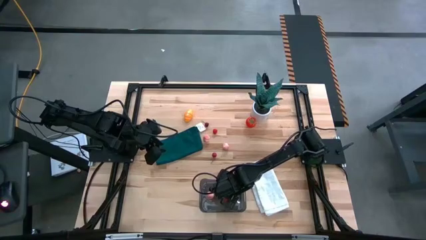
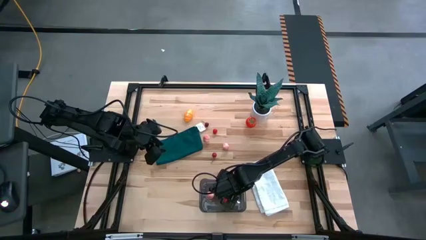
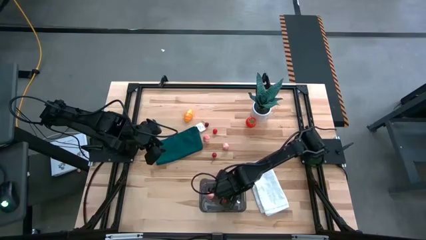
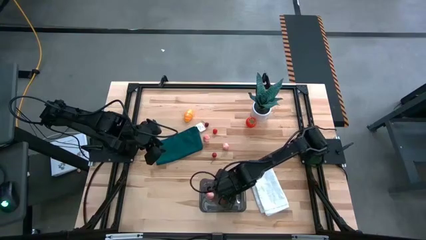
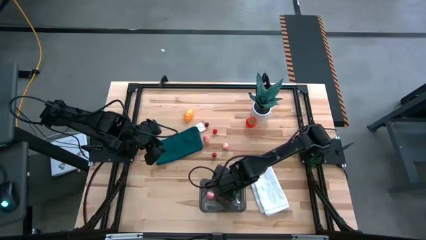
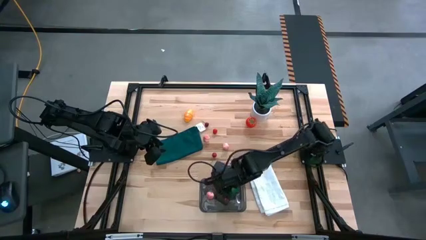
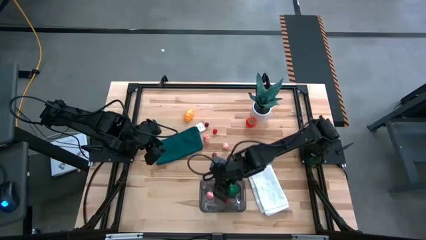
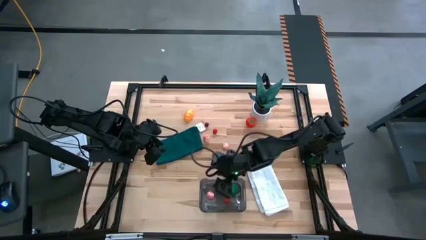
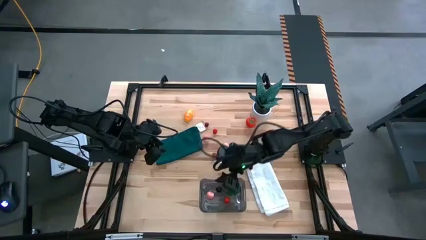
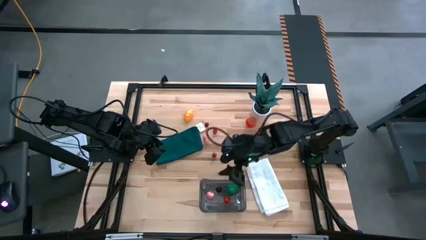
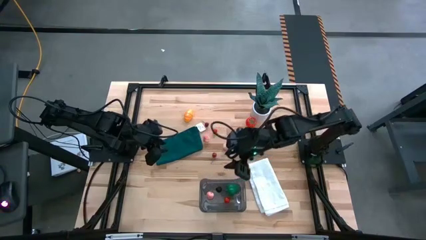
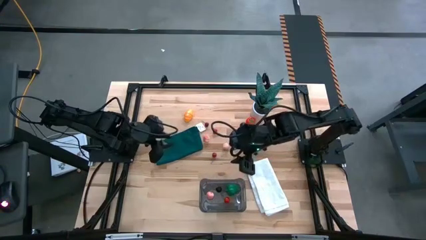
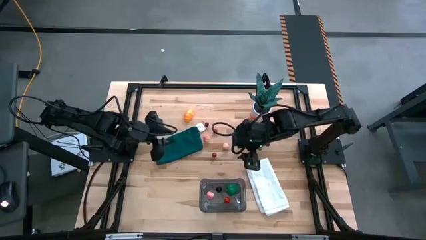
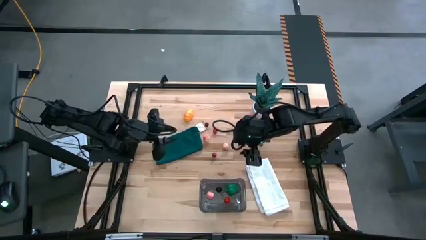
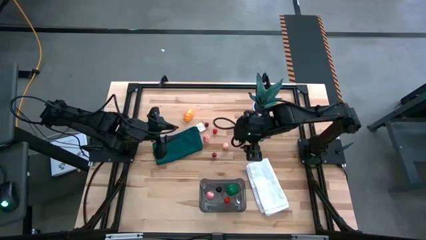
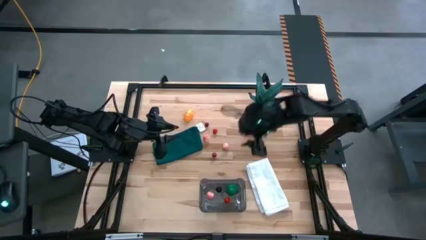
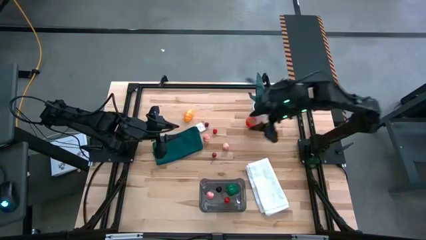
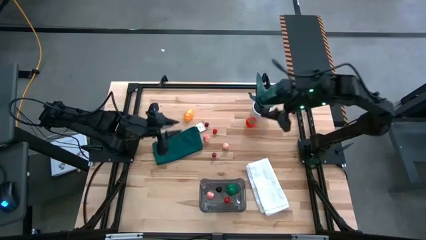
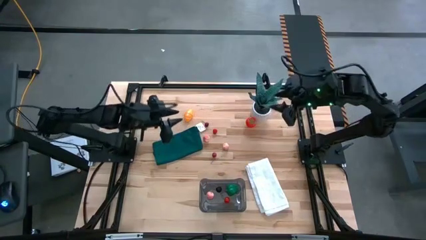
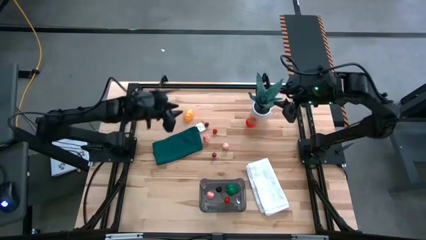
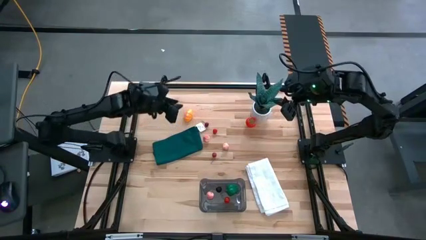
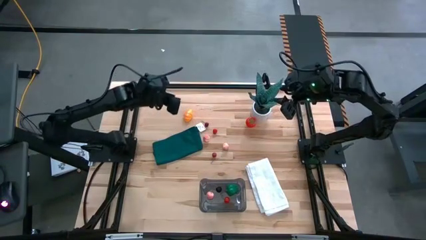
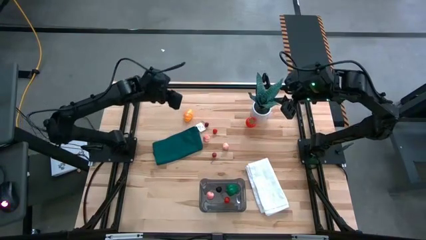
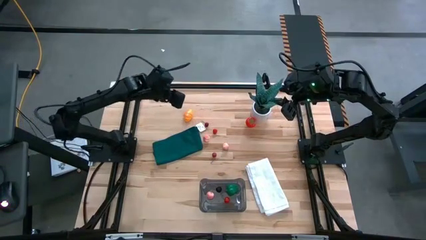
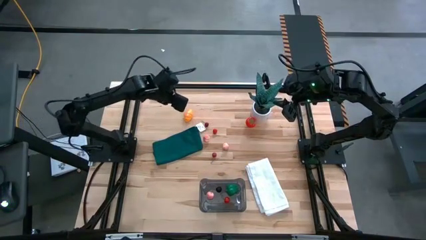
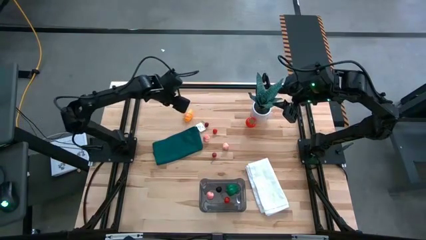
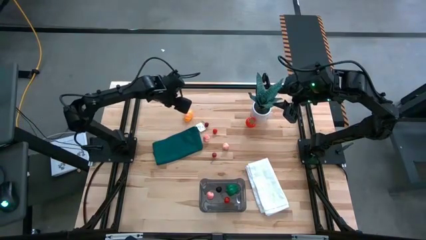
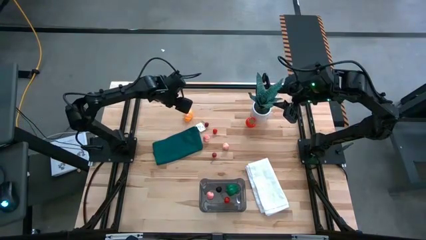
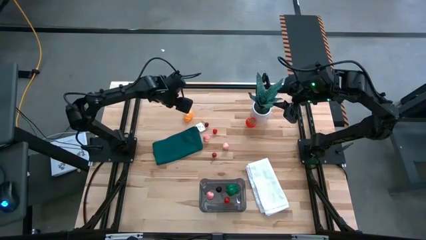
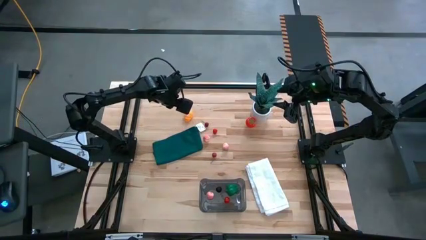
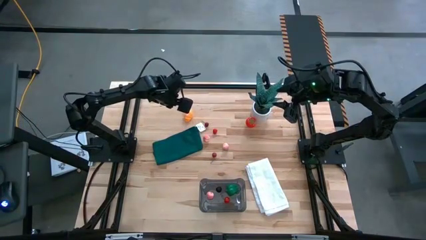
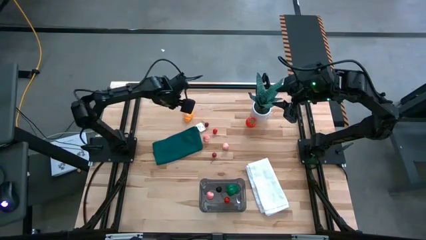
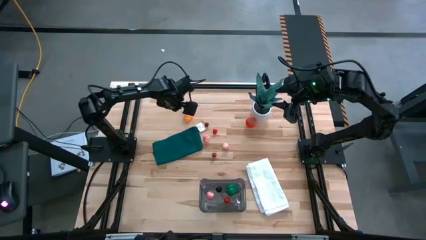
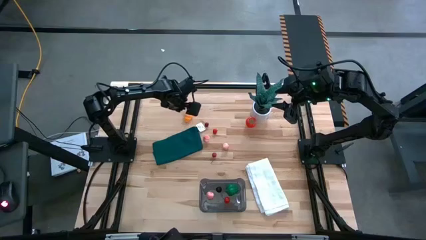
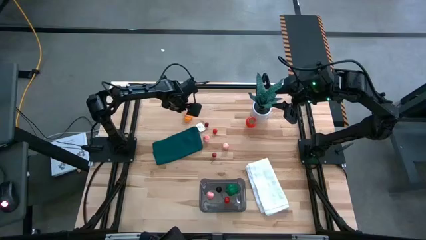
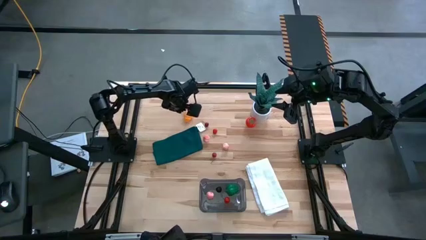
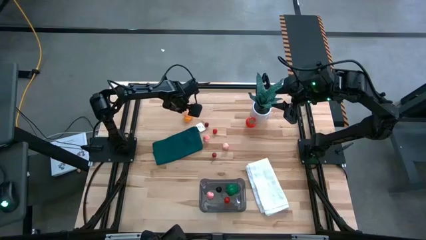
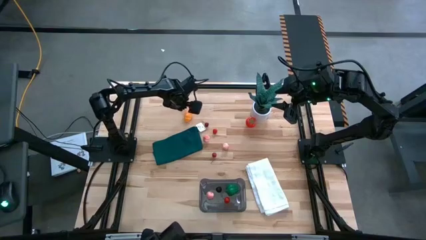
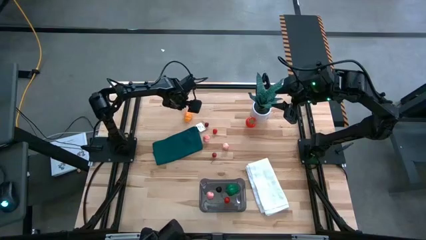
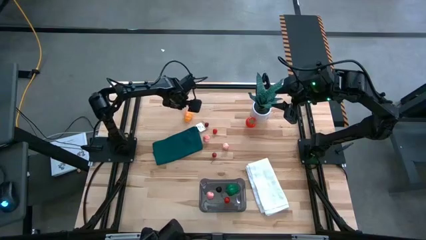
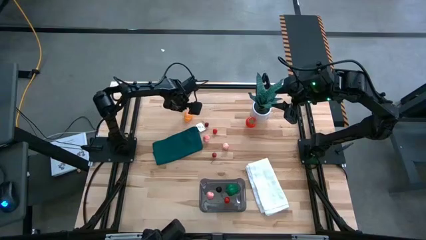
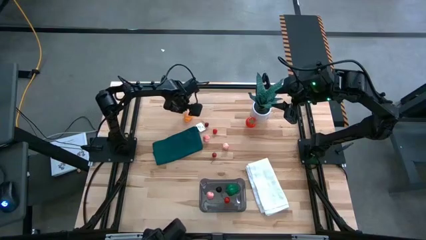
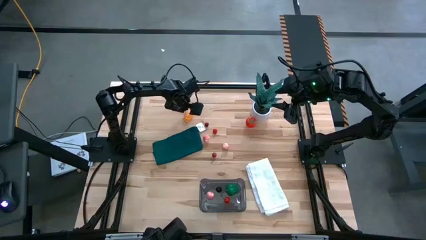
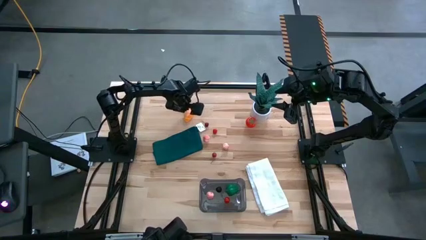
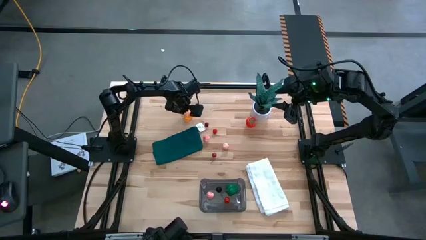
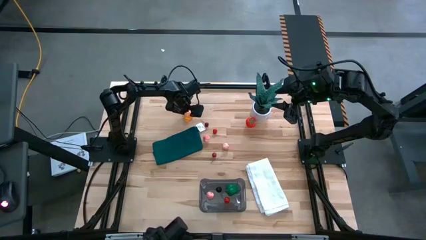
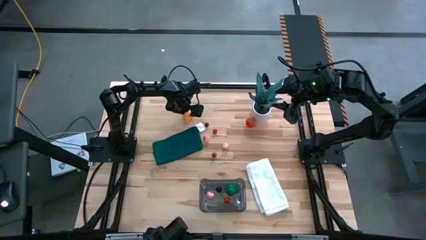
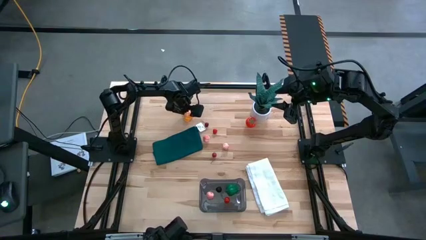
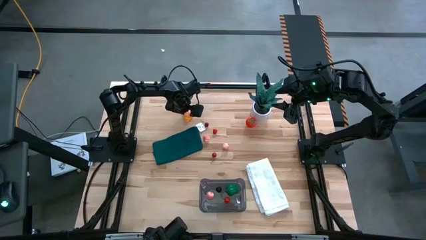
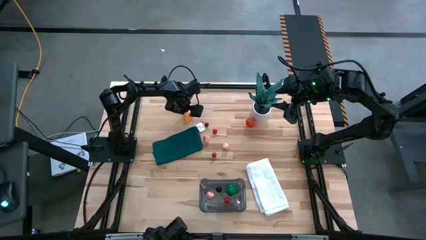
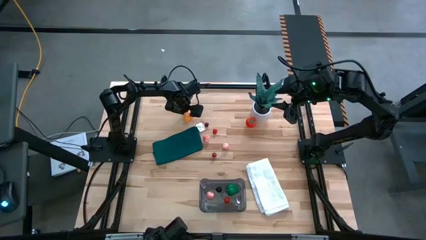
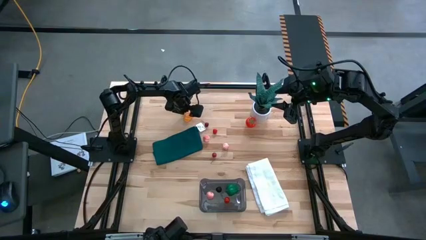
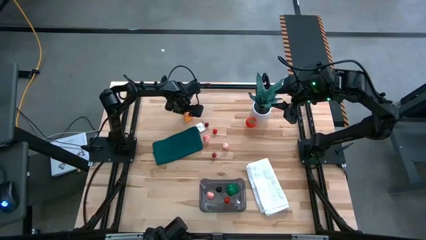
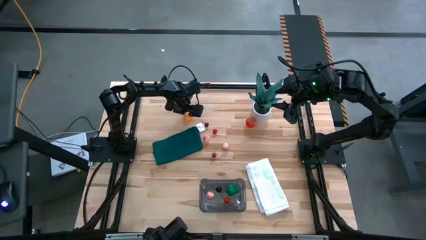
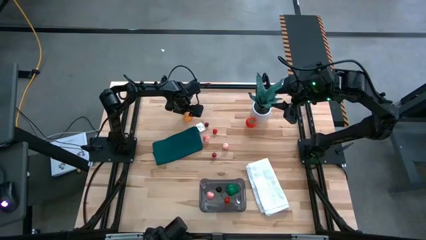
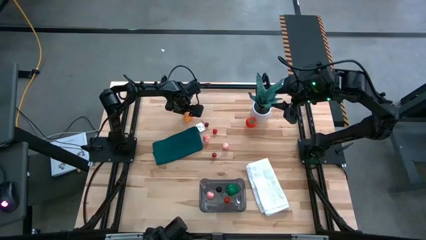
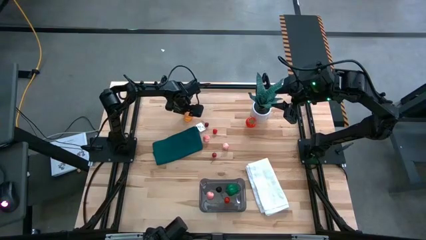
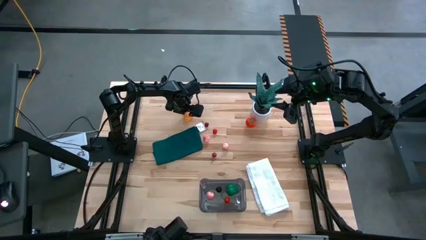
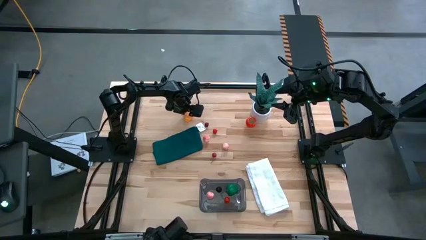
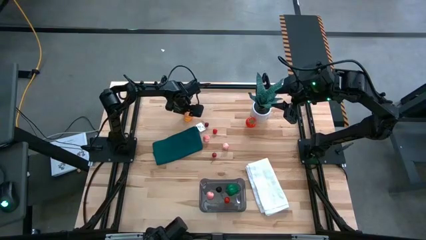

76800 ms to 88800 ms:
Task: Pick and placing Produce into tupperware
Put the orange croissant into the black bin

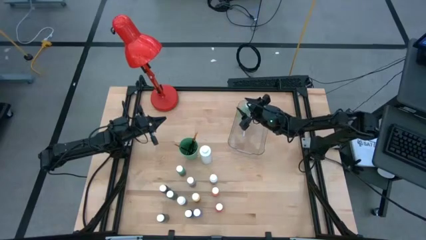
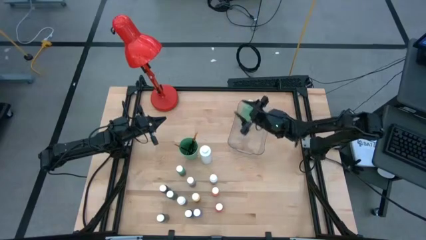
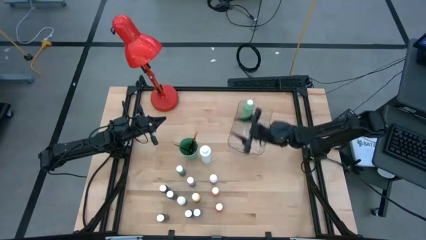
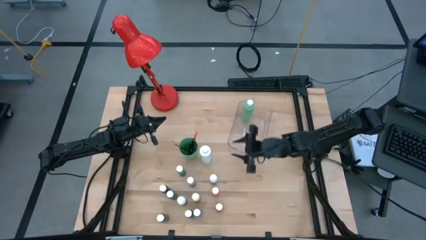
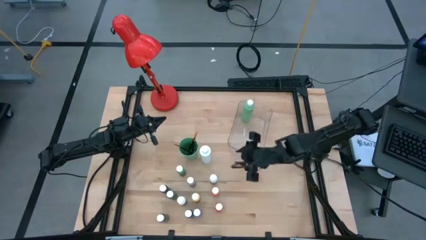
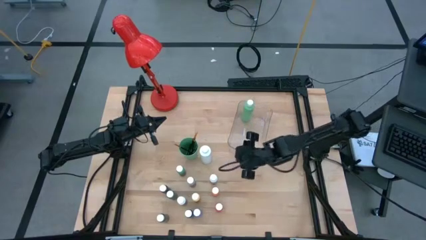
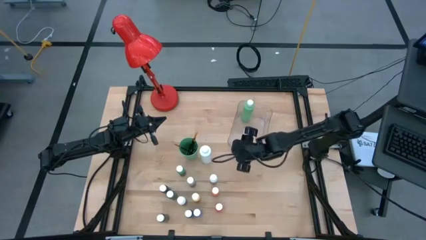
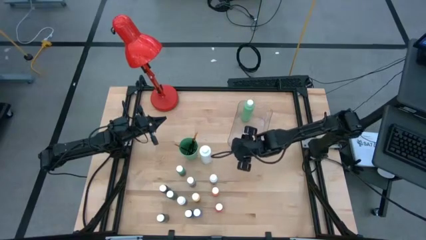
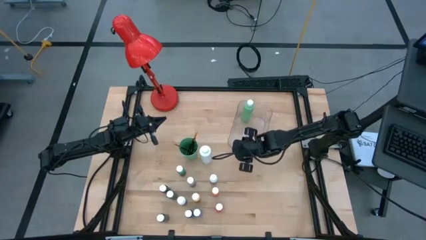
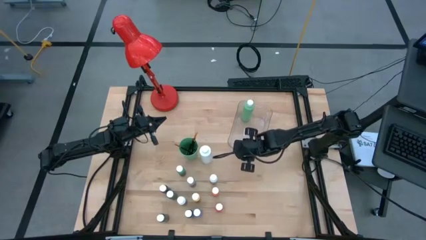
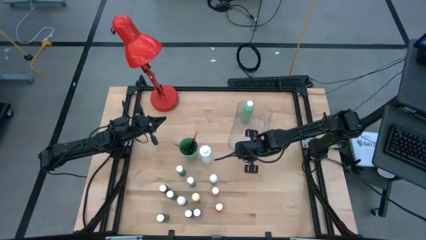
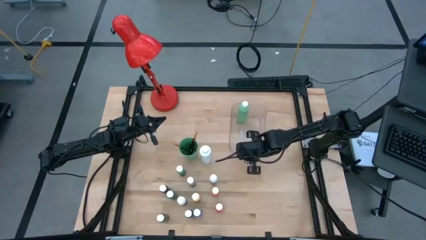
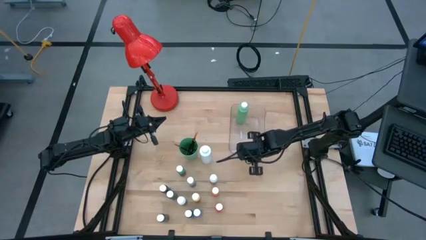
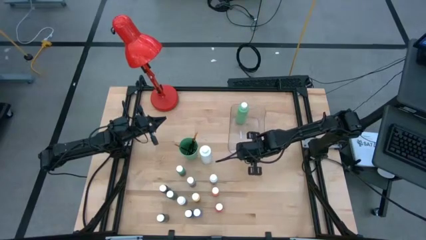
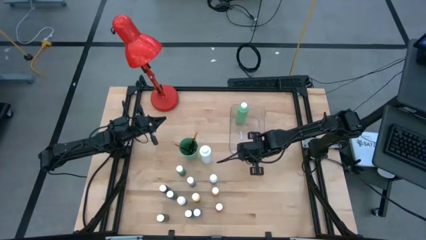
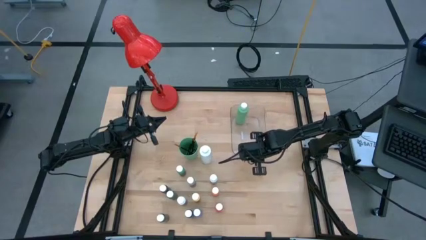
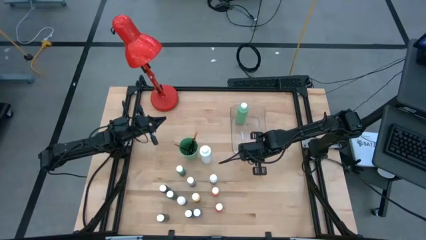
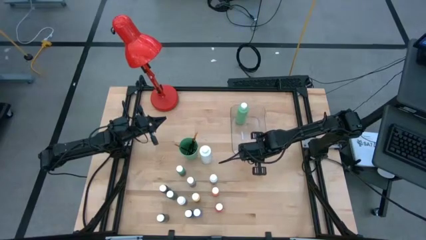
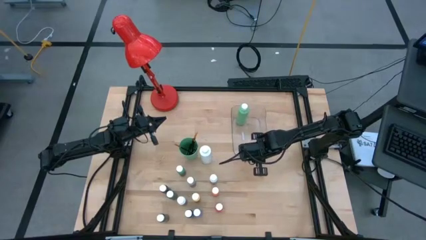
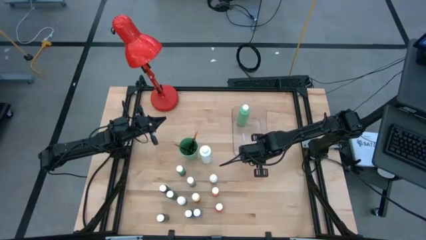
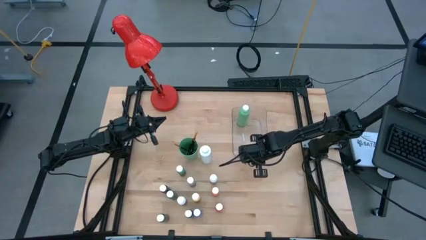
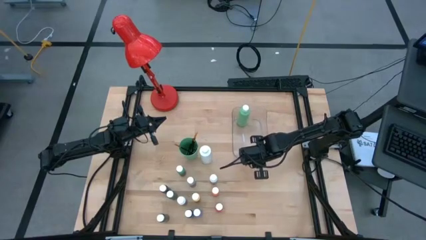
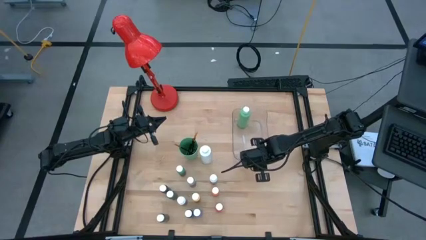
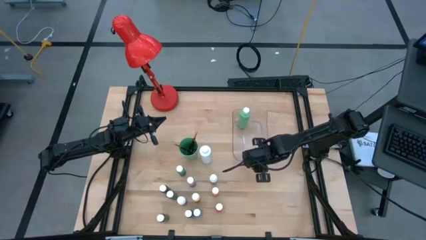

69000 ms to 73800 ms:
Task: Pick & Place Paint Supplies
Adjust the transparent bin
